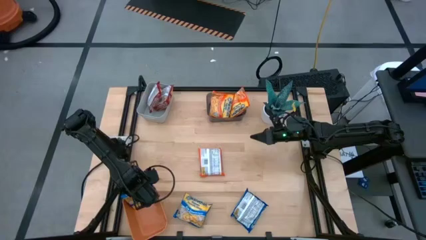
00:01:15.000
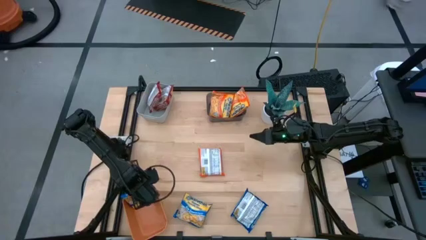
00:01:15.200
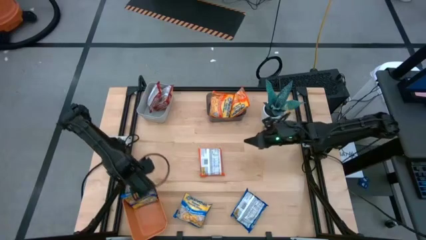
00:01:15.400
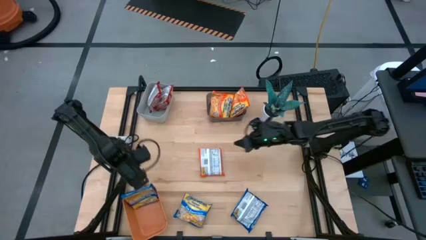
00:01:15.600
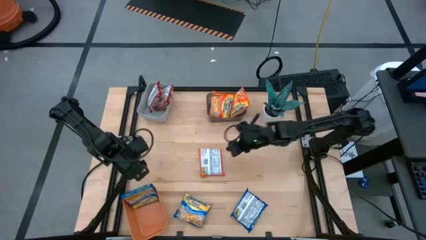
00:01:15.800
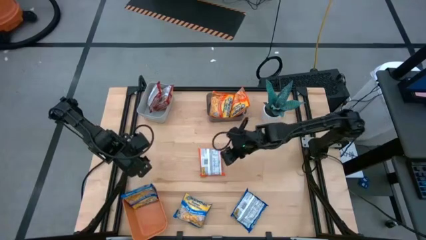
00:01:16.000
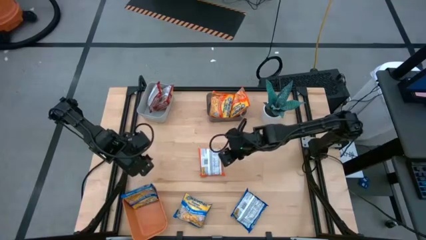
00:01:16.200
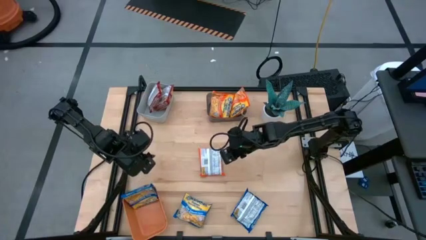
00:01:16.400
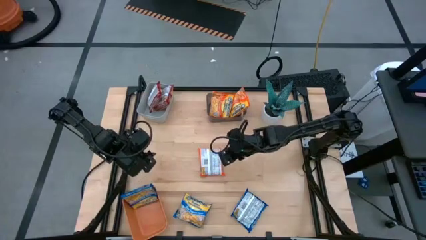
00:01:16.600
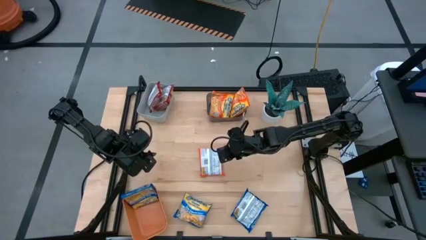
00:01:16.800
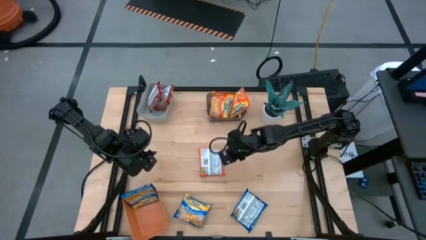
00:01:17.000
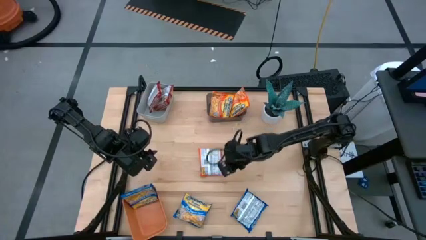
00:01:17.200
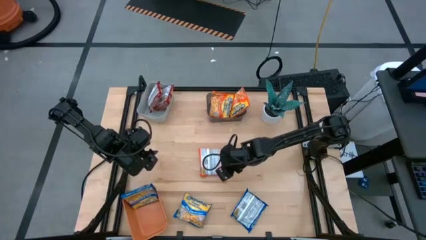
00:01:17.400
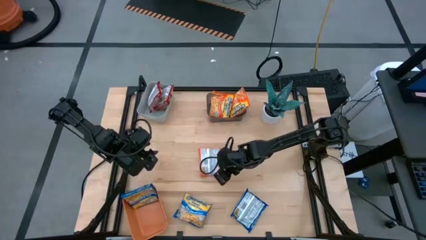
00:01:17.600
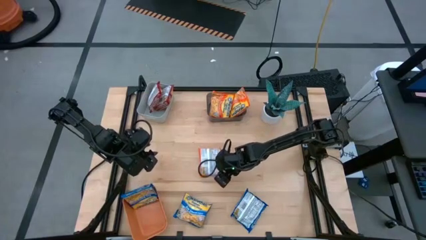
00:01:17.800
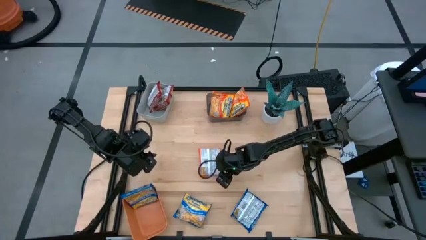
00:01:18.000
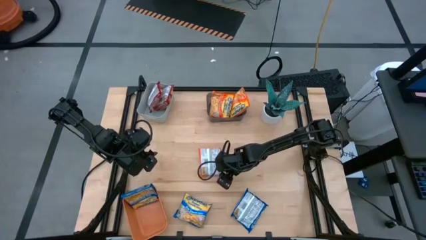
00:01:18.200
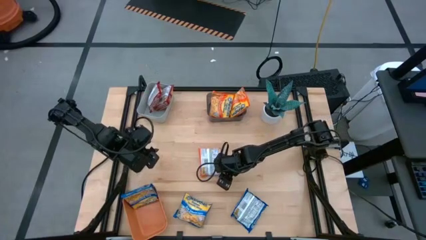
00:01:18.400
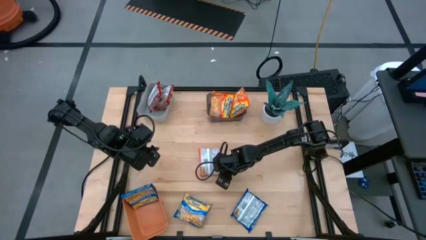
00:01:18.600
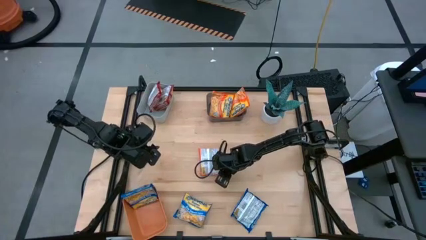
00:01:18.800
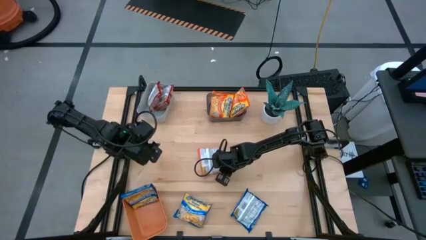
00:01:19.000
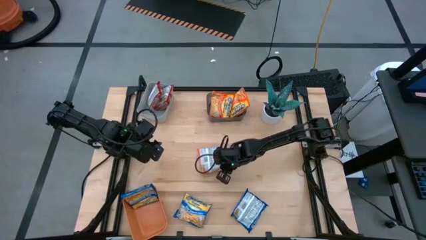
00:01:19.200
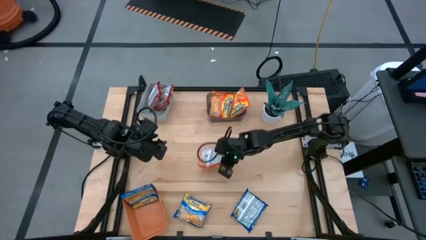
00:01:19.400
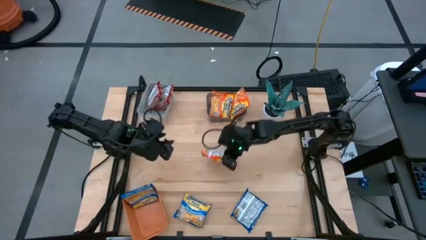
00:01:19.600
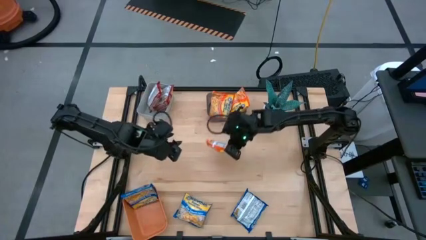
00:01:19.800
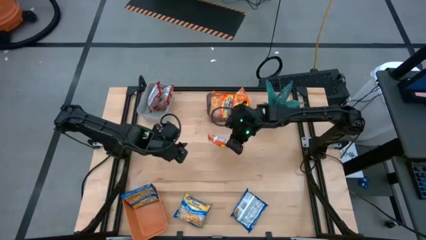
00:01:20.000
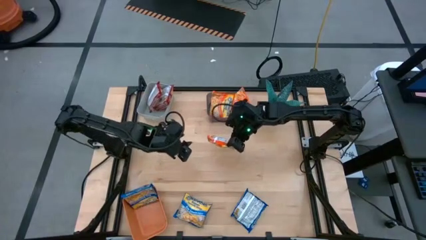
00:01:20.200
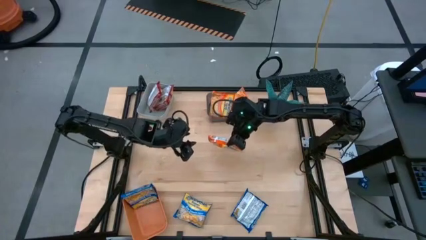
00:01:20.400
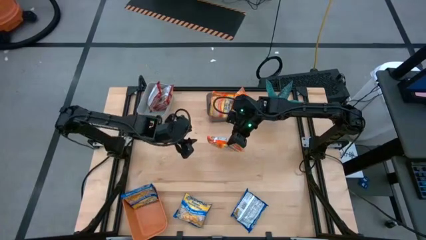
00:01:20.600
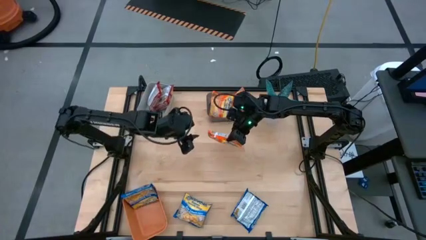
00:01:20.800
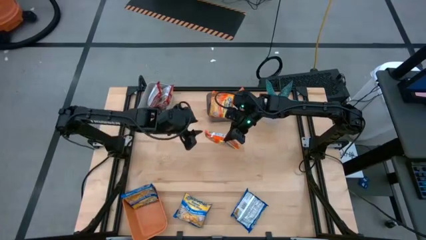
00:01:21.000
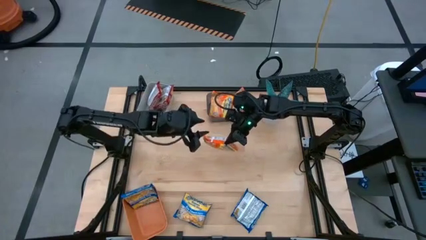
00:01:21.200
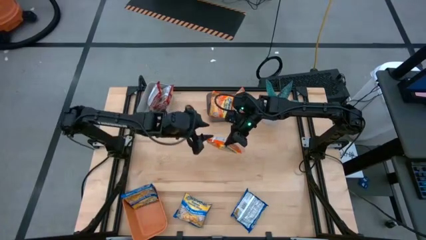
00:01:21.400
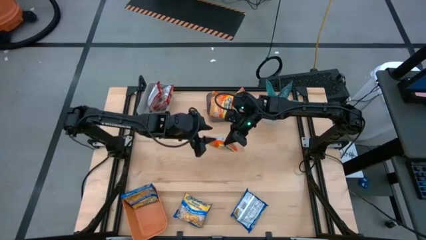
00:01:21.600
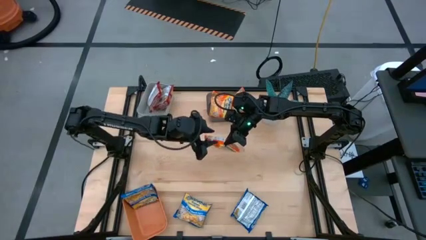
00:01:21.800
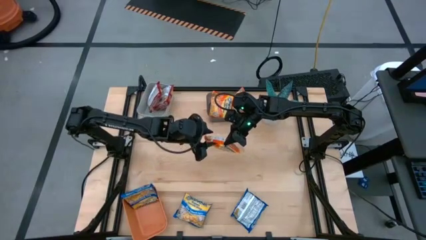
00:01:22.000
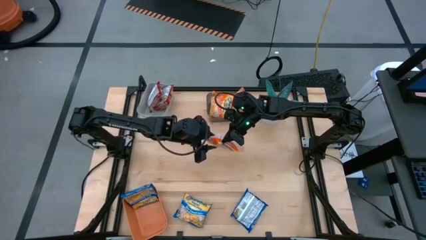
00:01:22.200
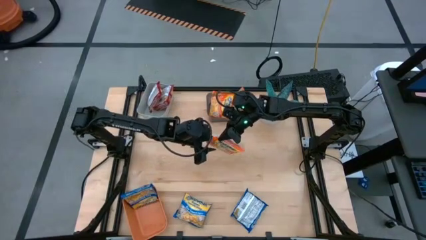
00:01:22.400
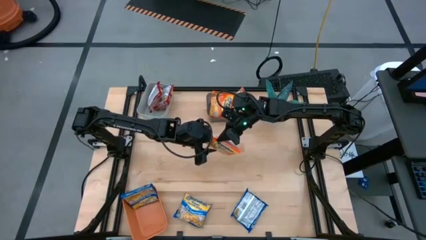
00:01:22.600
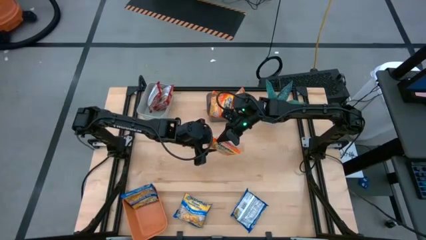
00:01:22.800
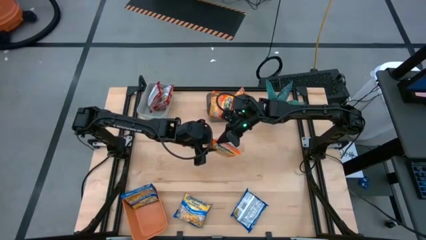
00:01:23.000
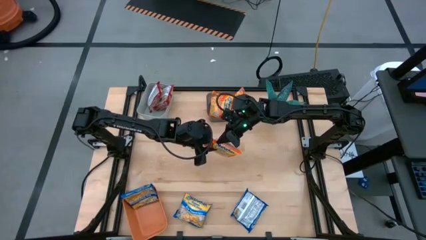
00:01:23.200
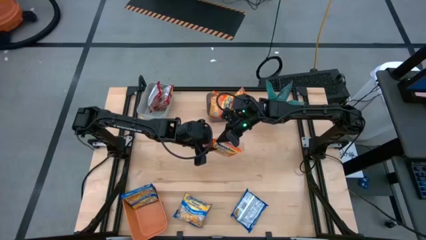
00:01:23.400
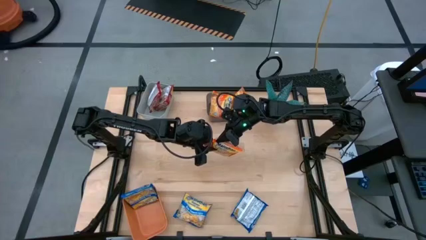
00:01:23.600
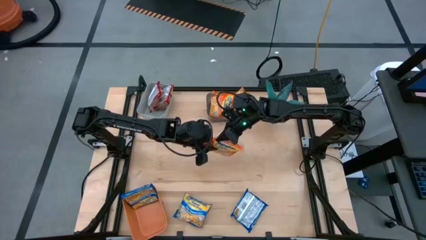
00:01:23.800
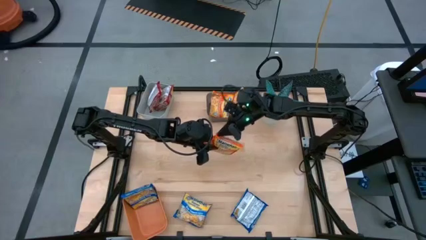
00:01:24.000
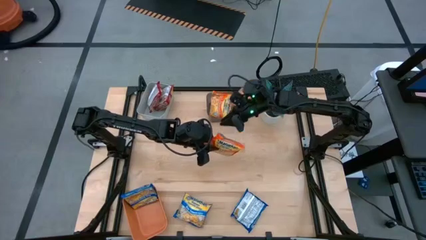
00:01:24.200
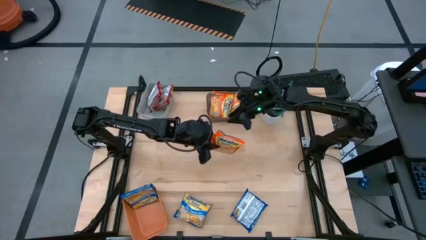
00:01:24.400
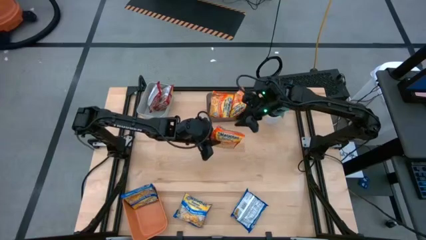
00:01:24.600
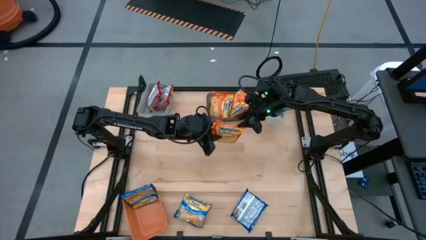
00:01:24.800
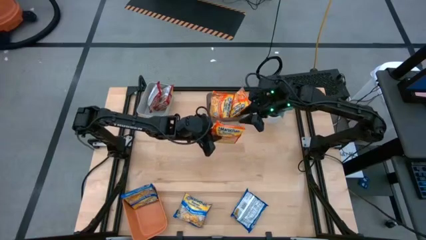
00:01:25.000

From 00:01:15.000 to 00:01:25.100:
Task: Sort Maruchan noodles
Put the orange noodle pack into the black bin

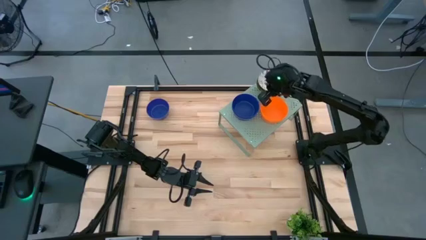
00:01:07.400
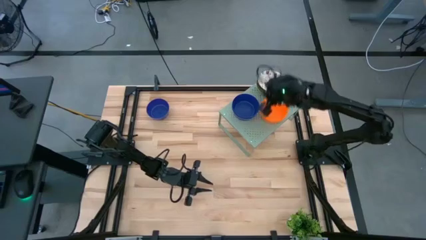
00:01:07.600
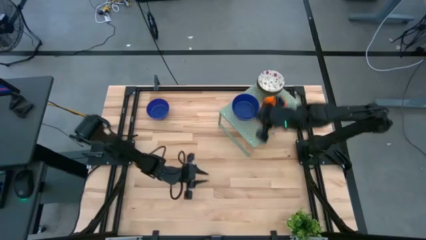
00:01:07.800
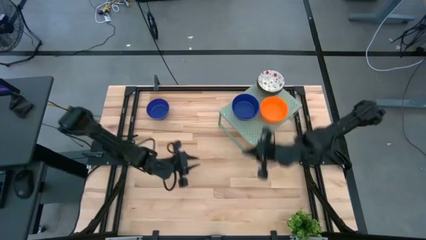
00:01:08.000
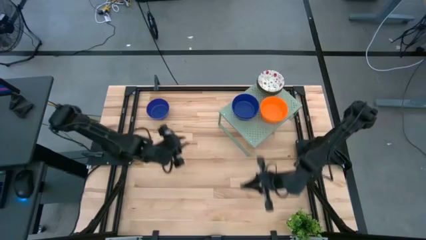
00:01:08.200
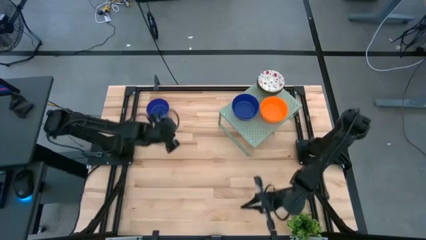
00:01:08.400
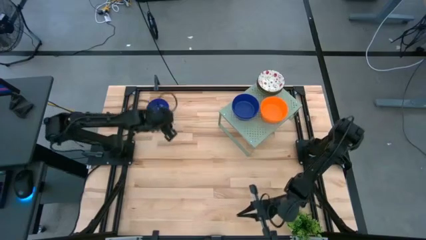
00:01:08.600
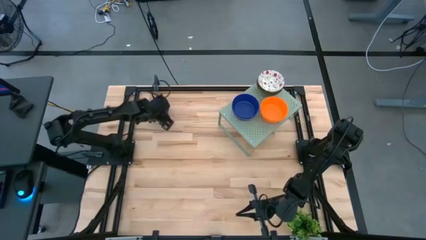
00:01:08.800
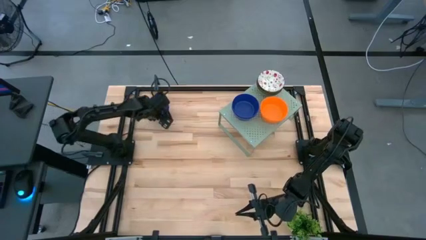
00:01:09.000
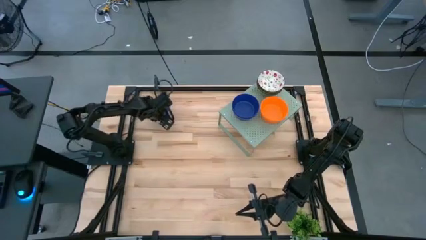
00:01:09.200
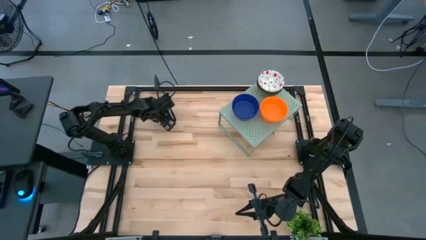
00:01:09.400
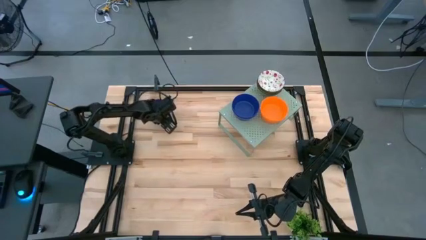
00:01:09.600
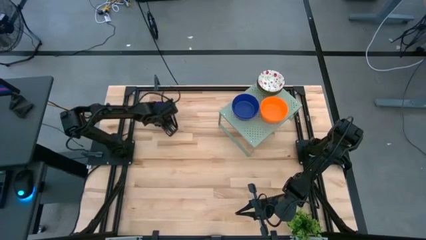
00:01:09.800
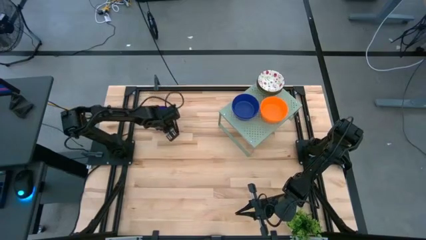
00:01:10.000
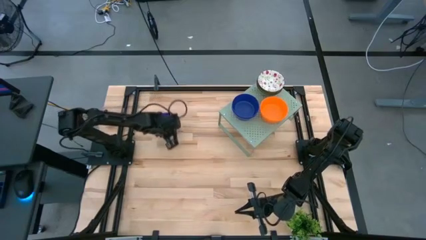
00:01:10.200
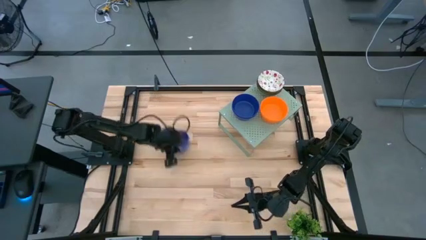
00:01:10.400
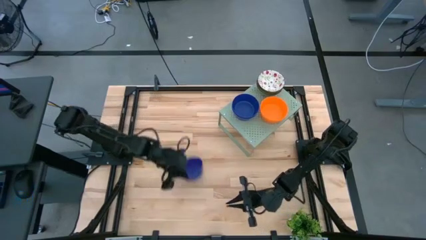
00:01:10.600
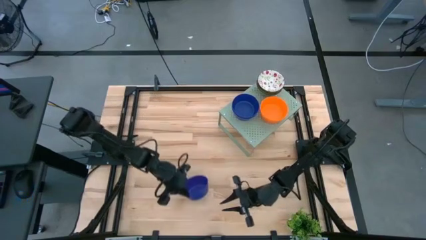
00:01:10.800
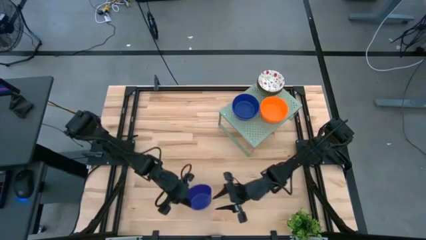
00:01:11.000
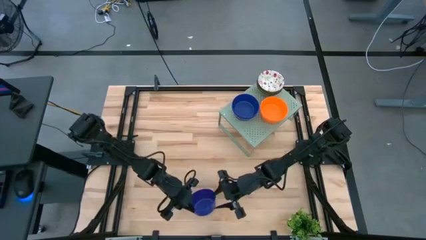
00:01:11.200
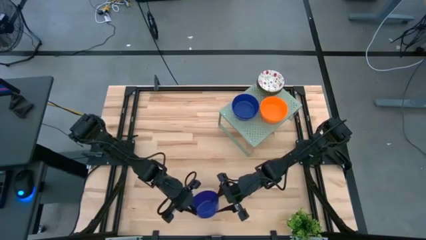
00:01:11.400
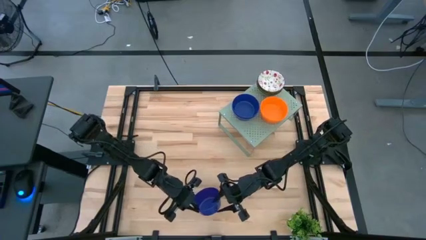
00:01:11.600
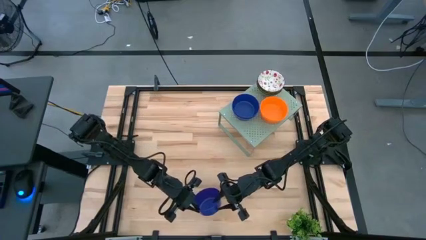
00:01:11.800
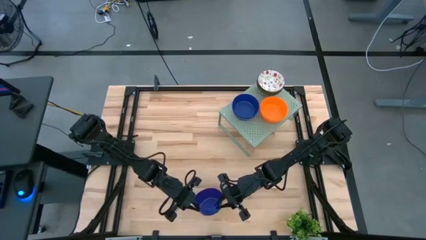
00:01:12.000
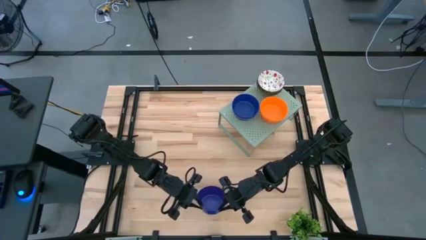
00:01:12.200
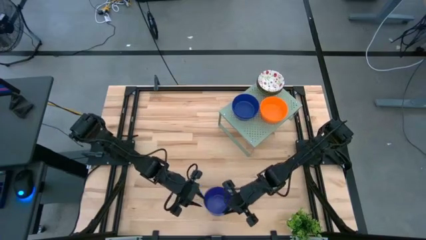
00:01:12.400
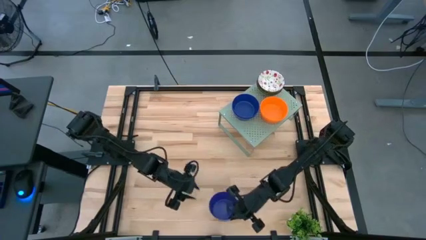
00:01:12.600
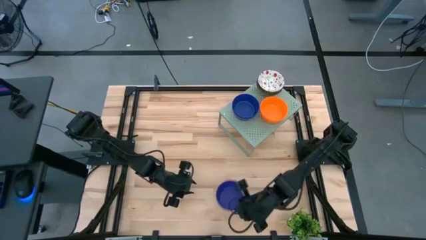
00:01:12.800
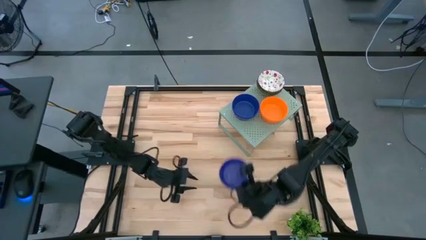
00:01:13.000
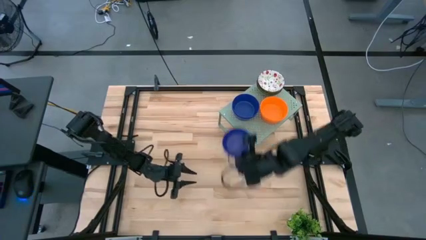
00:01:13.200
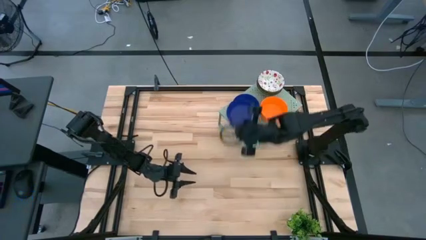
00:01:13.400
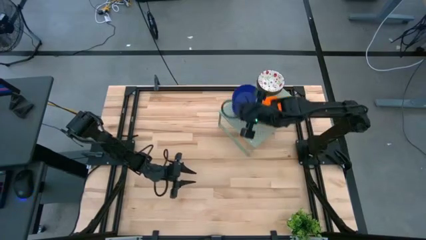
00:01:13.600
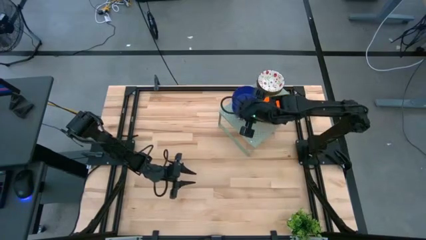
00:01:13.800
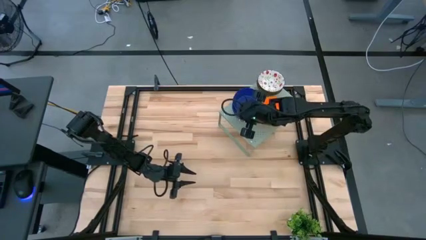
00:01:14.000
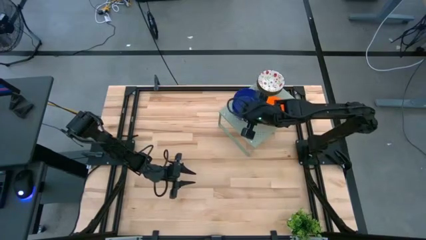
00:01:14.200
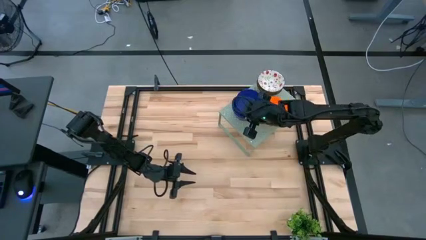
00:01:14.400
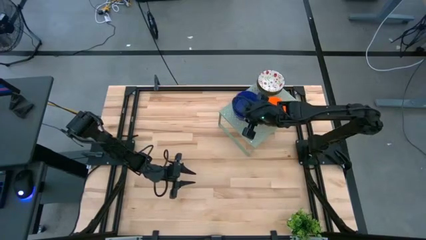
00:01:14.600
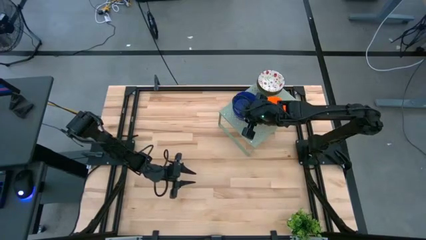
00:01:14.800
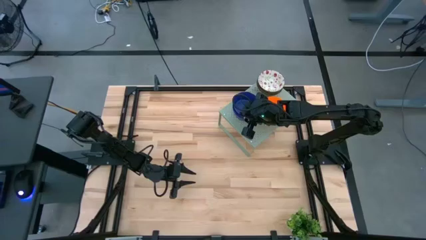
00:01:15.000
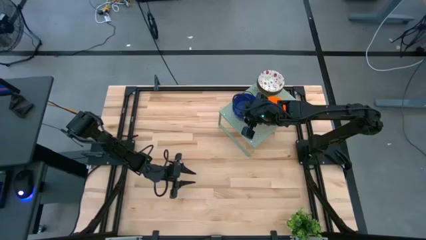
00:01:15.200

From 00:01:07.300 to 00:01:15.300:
Task: Pick & Place Mini bowls
Stack the blue bowl on the blue bowl on the shelf
